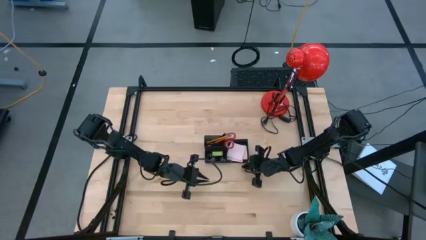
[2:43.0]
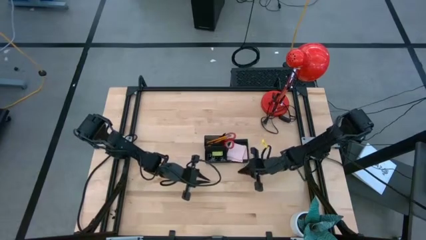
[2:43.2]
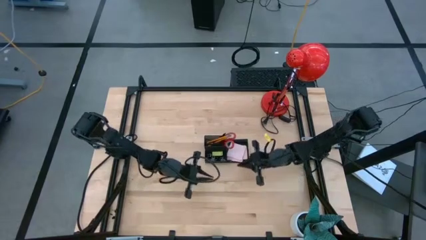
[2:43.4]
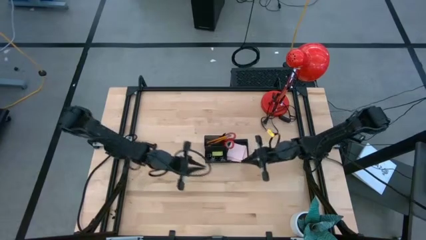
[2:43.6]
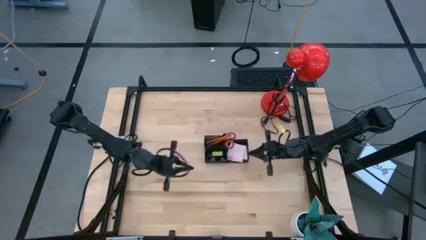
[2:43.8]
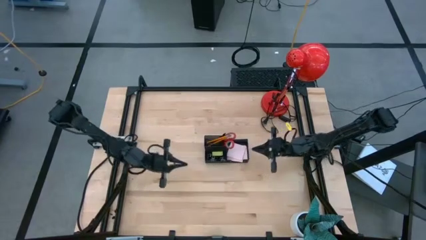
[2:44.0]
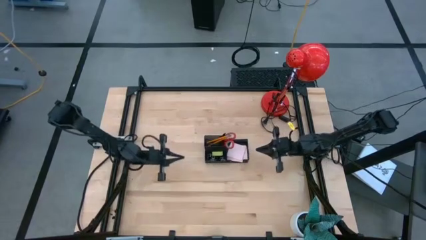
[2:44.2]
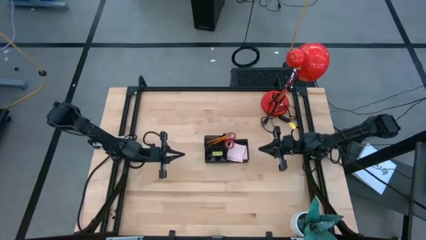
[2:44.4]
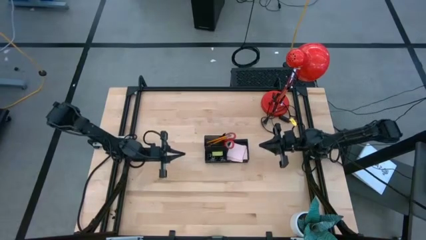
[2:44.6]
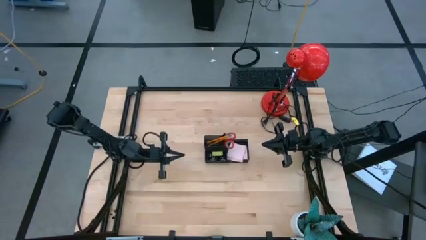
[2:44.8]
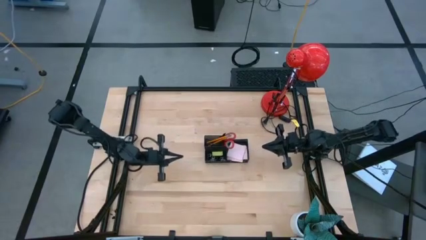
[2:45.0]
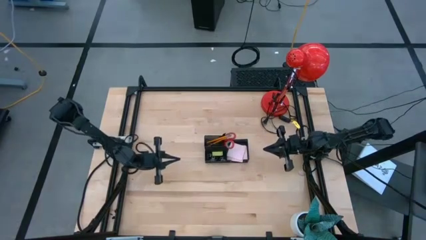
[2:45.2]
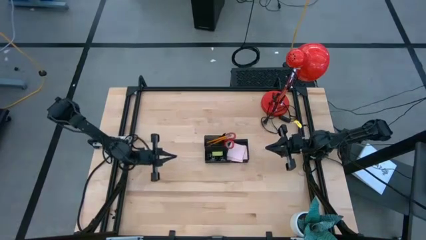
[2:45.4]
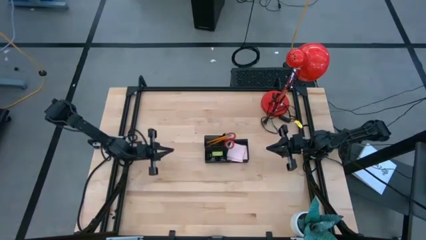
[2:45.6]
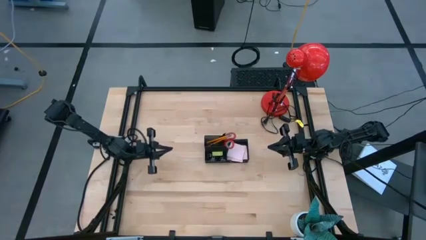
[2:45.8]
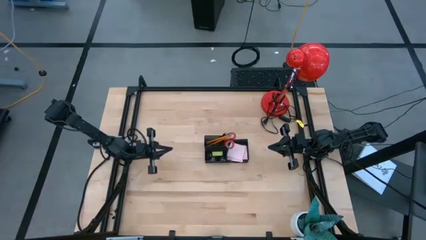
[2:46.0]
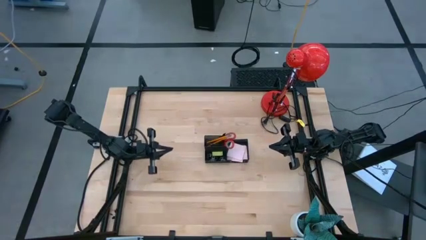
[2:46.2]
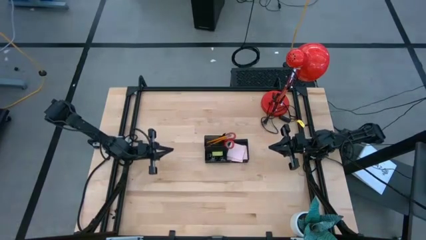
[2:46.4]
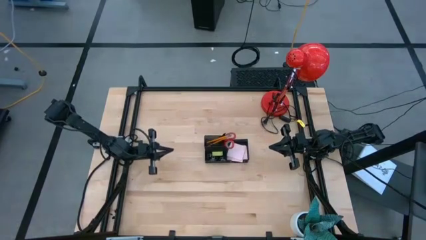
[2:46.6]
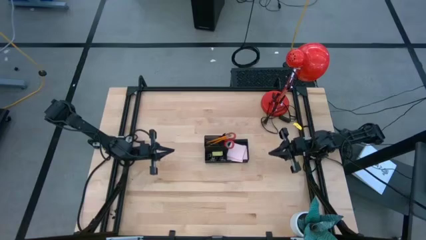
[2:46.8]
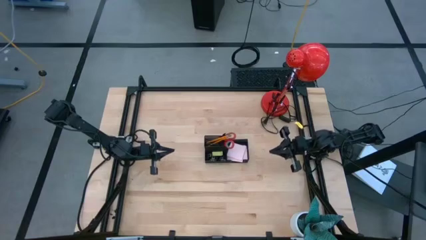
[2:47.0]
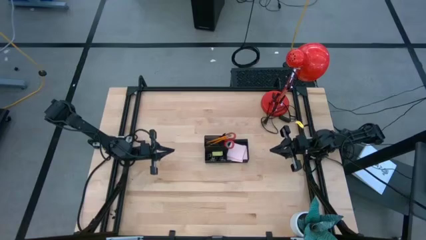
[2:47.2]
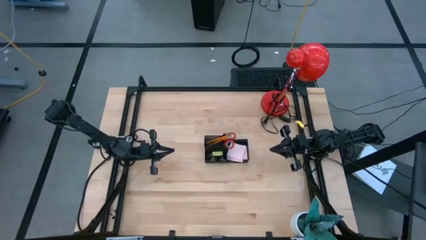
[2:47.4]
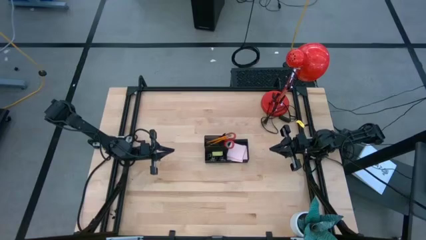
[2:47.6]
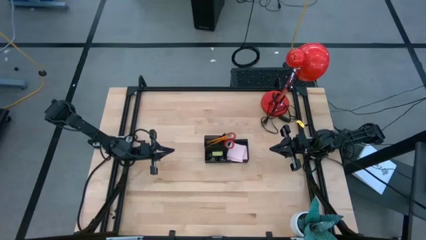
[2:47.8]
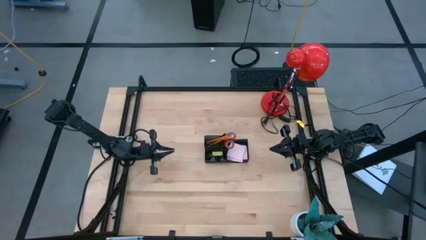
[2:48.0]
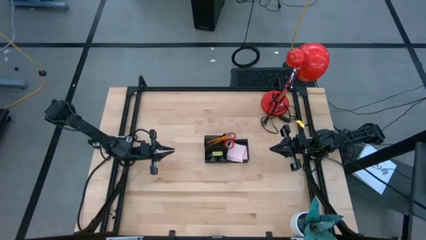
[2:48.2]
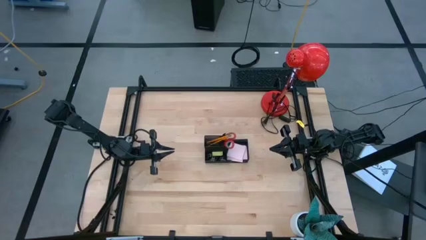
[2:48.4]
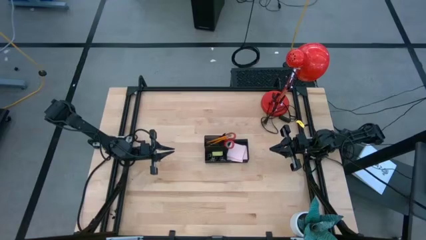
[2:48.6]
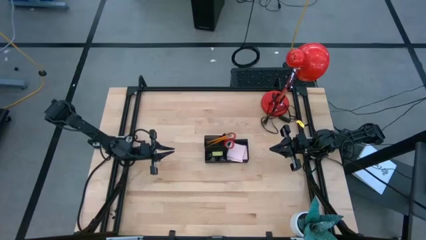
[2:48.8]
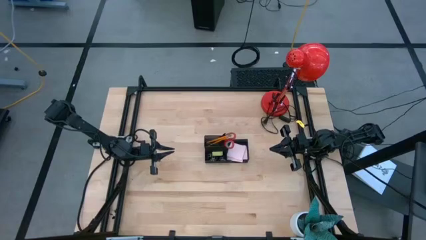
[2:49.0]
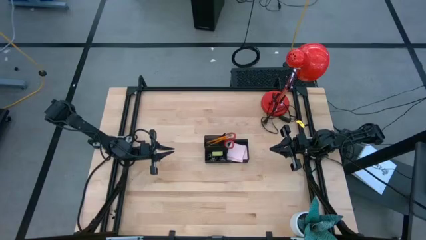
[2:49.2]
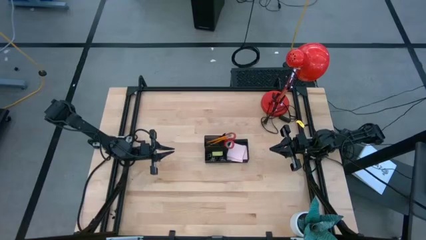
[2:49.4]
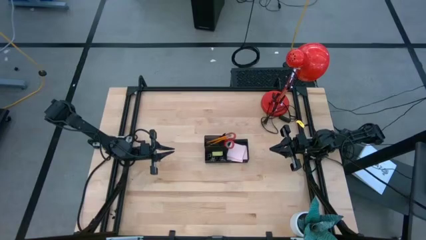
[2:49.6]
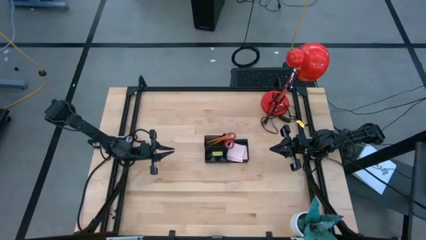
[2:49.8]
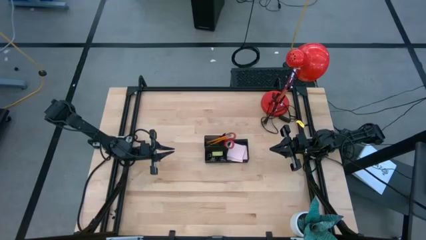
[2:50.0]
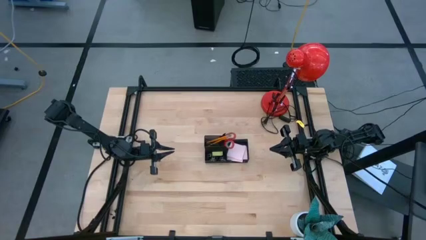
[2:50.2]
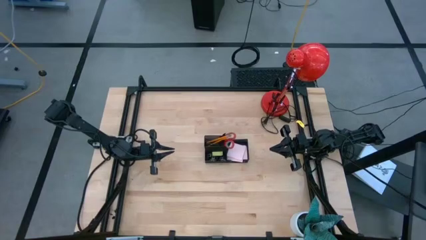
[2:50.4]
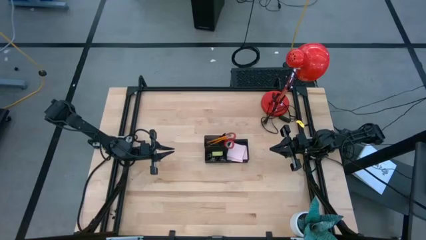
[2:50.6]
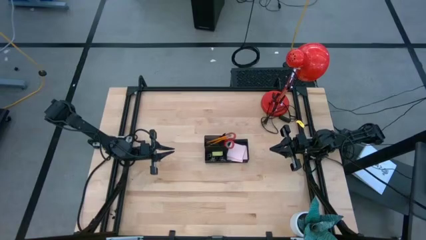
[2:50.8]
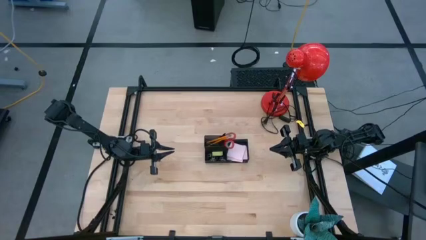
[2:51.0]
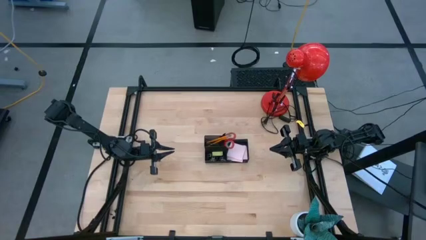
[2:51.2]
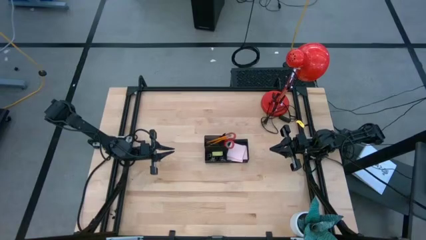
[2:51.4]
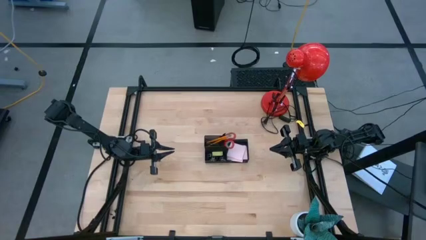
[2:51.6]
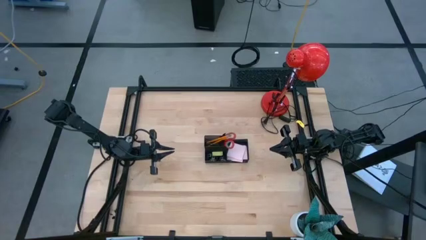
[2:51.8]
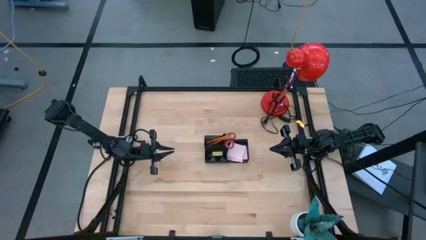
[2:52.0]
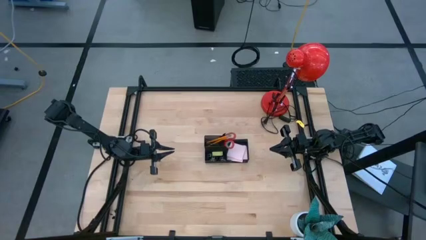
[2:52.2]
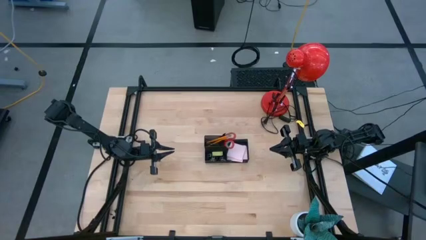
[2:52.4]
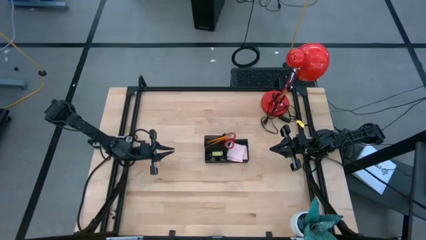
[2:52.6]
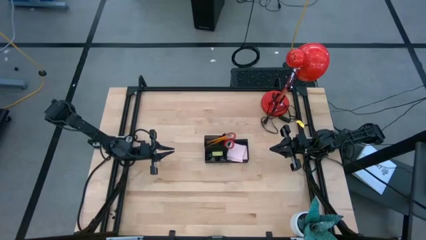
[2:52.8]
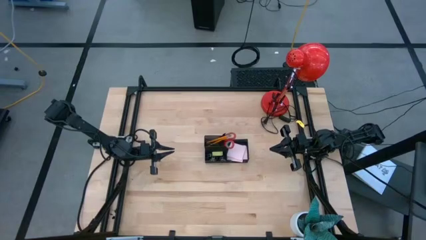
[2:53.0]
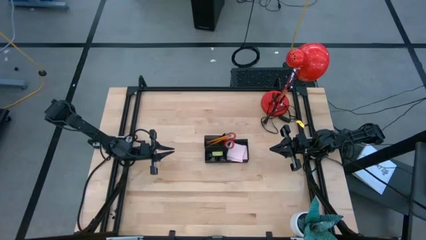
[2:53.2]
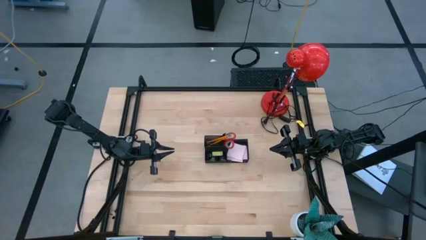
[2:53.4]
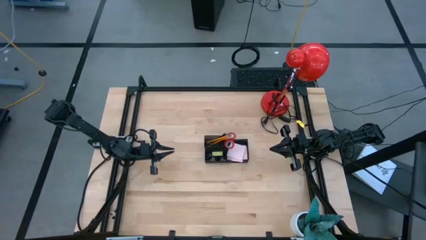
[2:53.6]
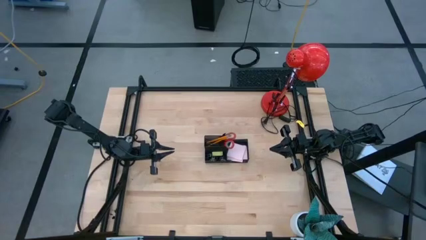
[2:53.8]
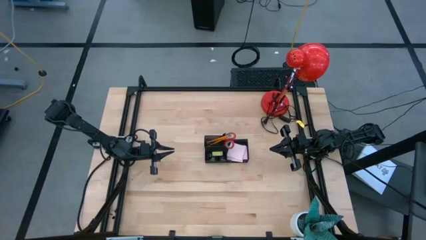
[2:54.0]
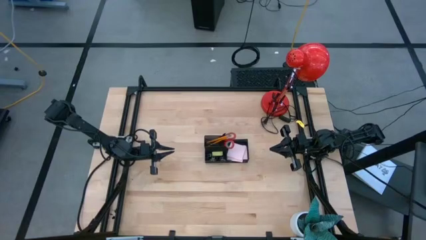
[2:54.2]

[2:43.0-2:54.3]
Task: Pick and place office supplies into organizer
Return to Home Position

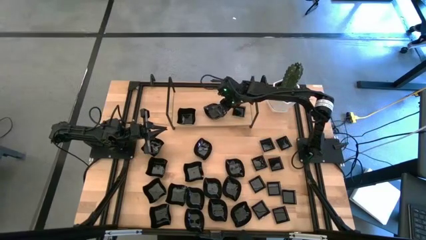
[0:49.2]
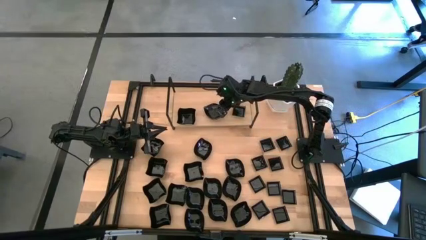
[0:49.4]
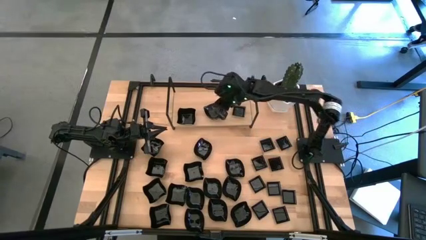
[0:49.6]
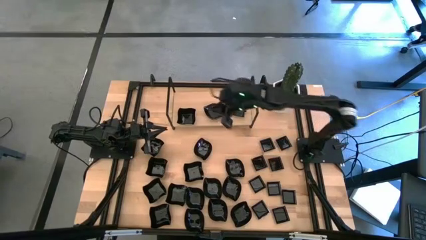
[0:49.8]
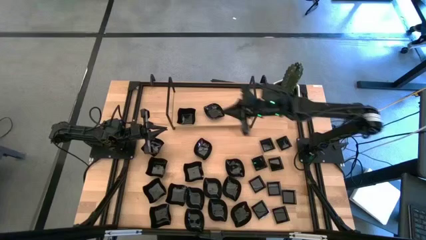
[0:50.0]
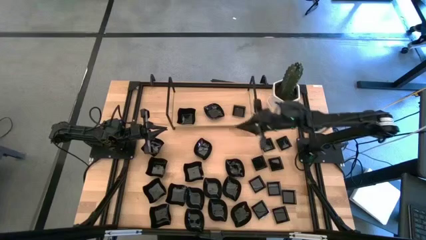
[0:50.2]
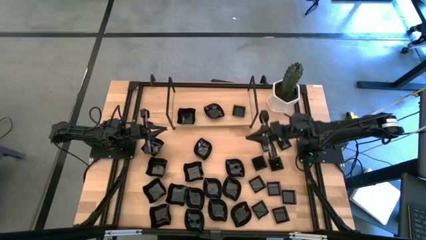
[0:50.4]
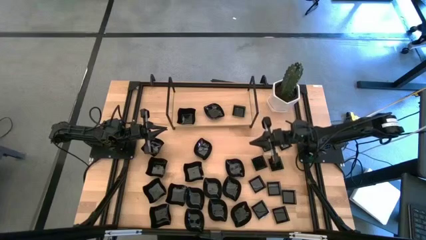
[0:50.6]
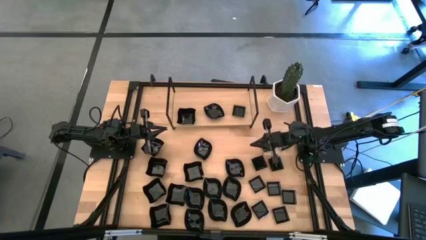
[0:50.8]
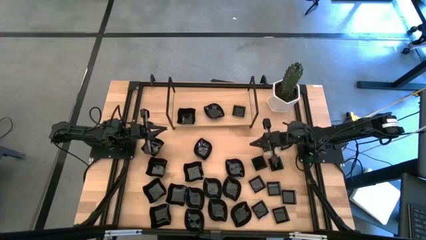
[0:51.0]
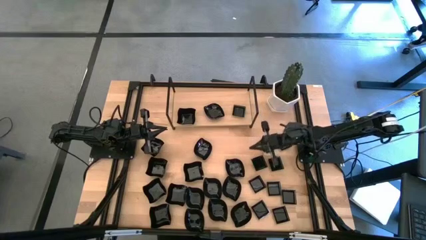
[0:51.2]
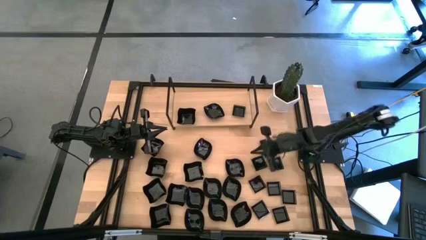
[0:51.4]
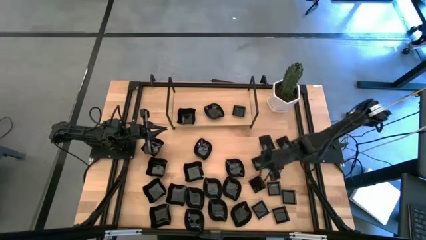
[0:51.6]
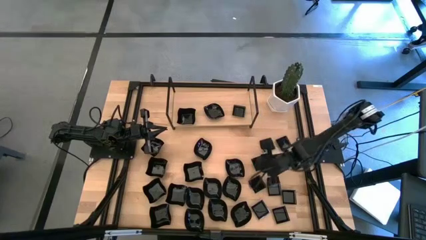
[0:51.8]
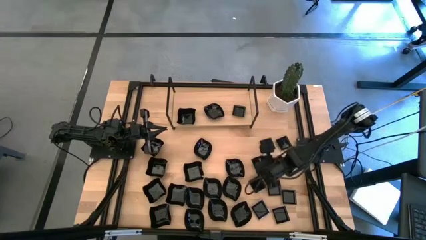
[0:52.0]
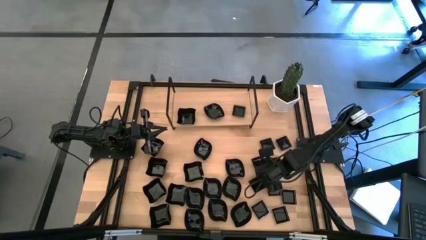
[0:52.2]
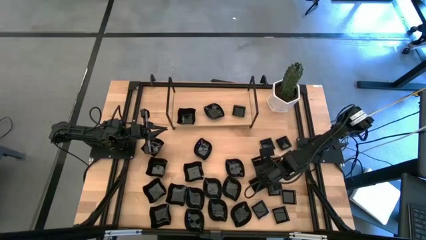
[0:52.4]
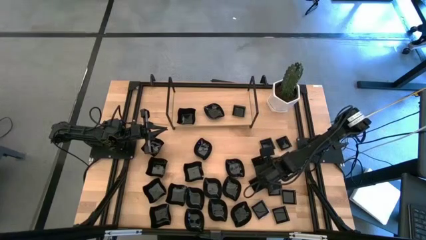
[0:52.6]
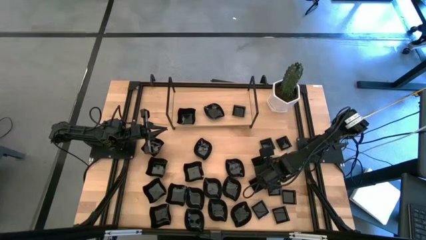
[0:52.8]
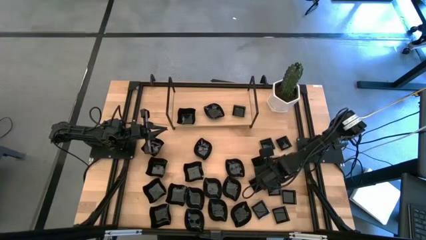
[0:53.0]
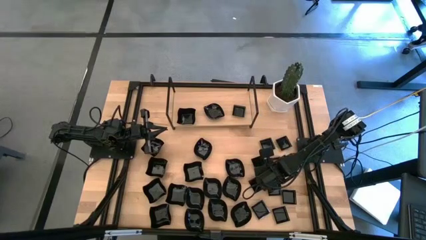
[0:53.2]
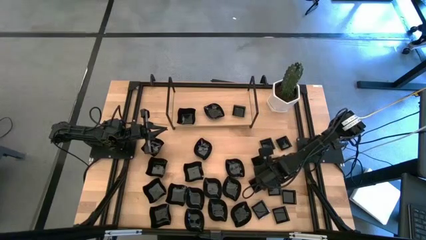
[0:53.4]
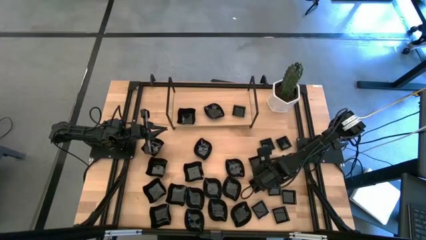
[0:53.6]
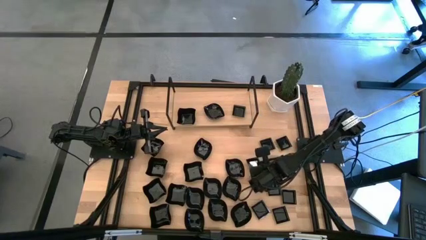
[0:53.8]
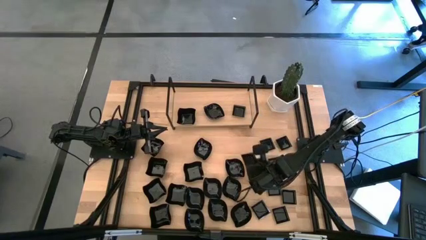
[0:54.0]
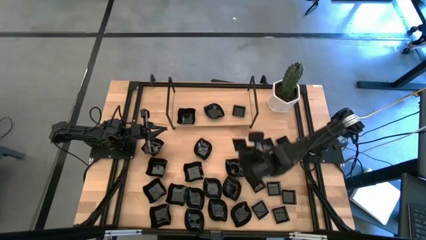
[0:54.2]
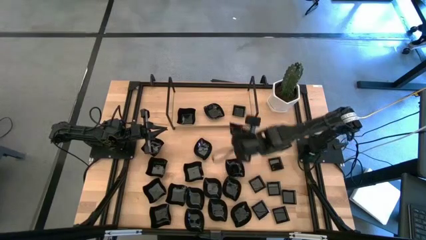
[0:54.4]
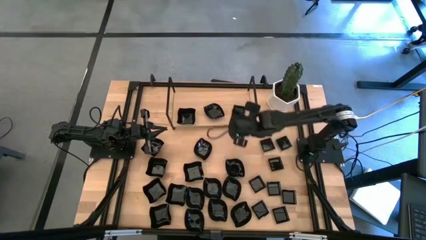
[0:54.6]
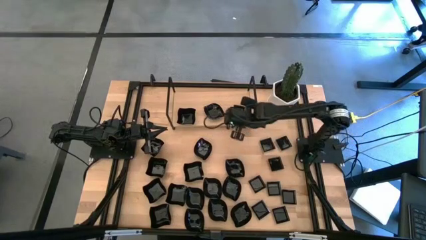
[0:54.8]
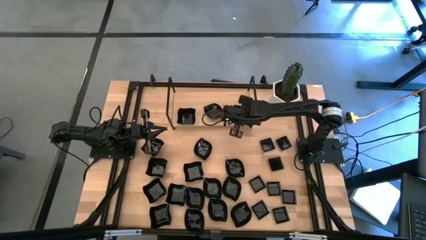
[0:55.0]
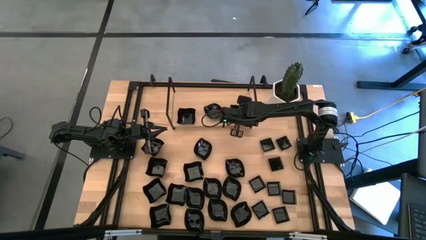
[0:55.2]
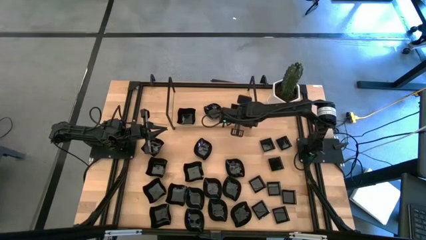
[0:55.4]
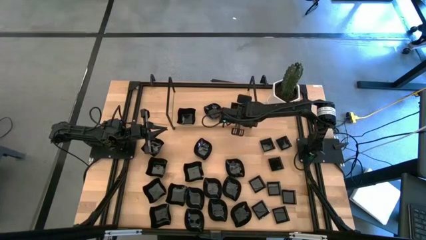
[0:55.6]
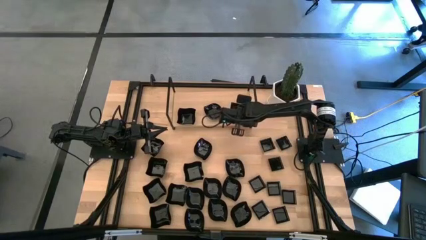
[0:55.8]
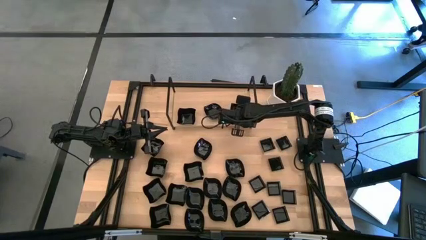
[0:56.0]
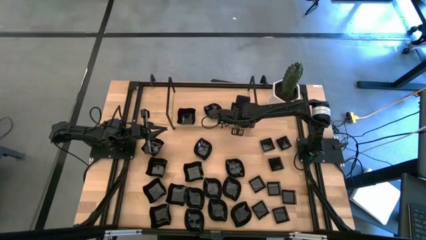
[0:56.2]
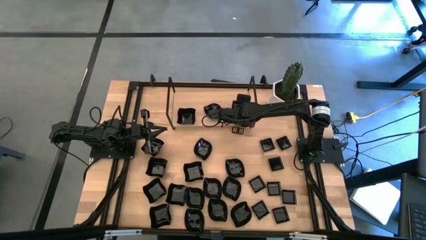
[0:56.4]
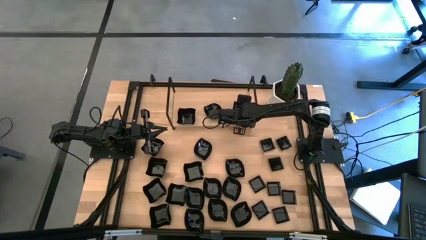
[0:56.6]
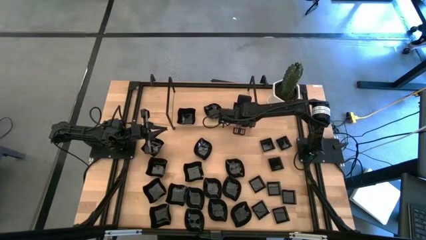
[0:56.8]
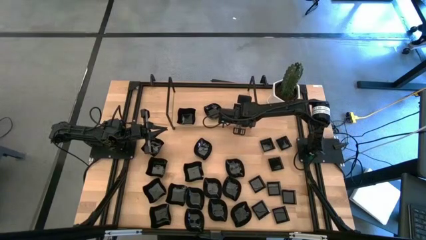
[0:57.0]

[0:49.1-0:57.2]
Task: Pick & Place Mini shaped plates
Stack the black square plate on top of the black square plate on the shelf
